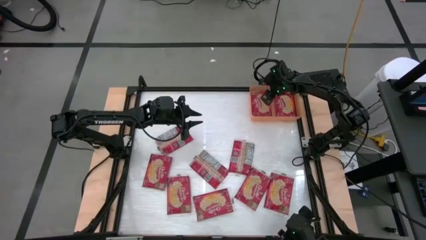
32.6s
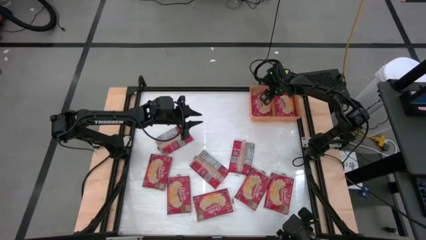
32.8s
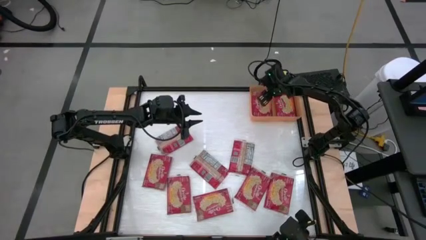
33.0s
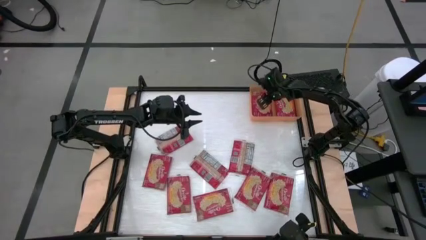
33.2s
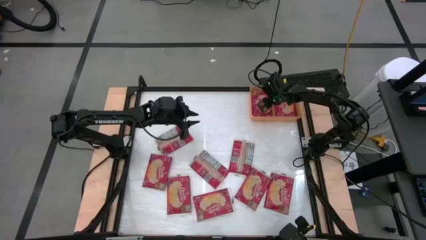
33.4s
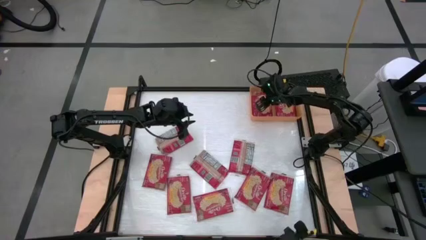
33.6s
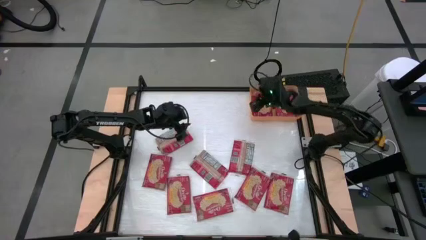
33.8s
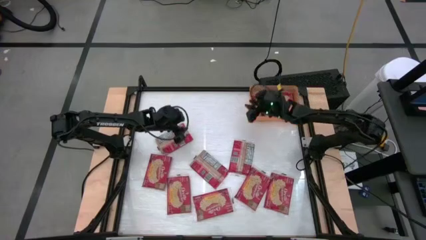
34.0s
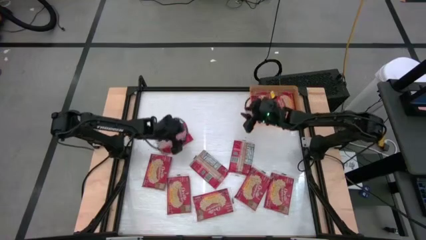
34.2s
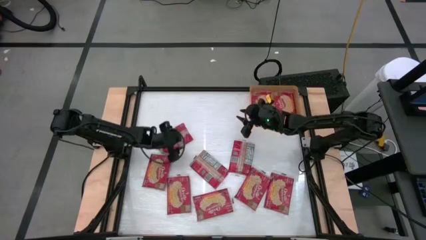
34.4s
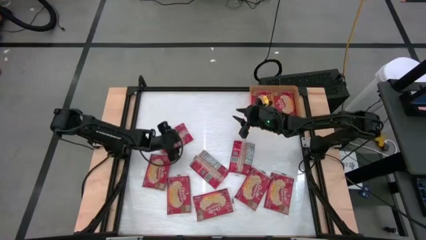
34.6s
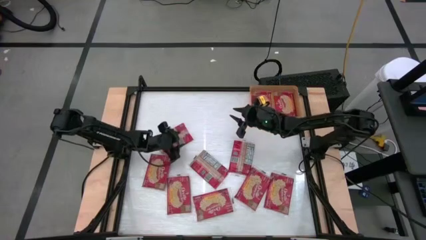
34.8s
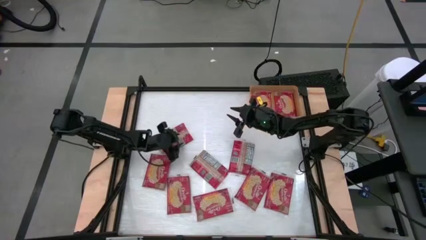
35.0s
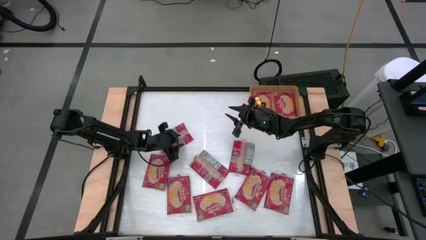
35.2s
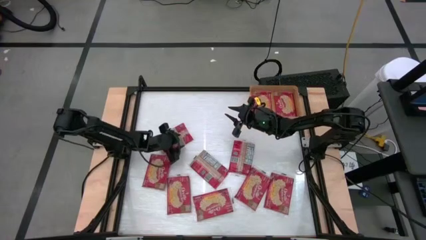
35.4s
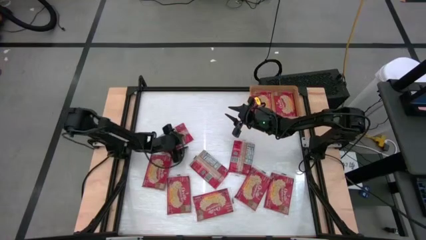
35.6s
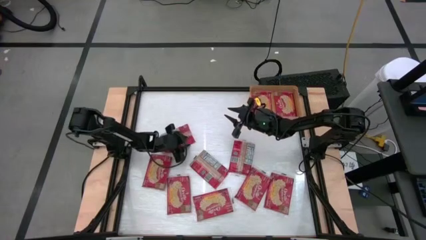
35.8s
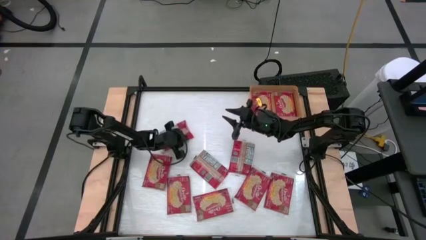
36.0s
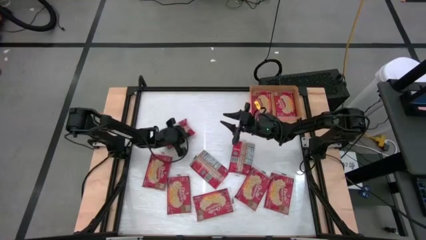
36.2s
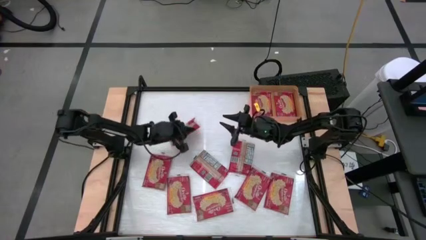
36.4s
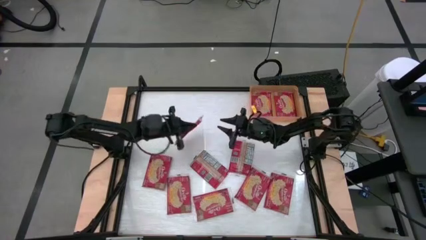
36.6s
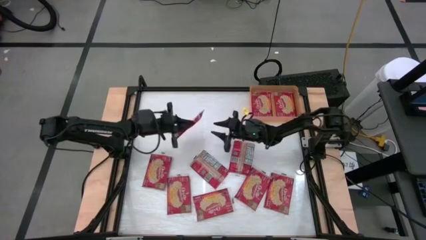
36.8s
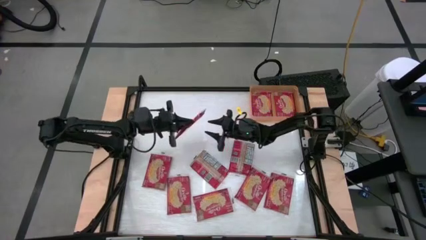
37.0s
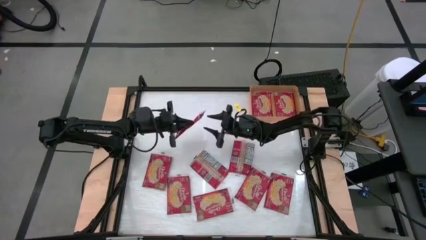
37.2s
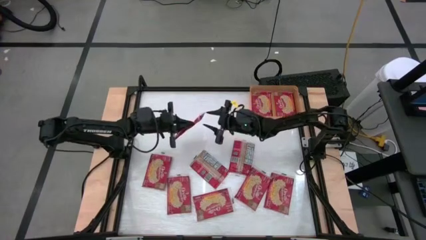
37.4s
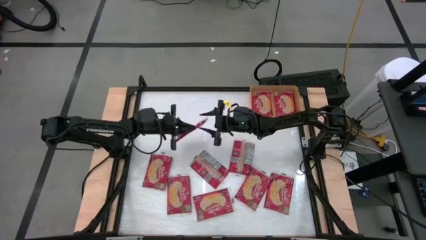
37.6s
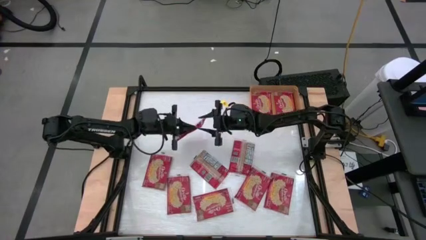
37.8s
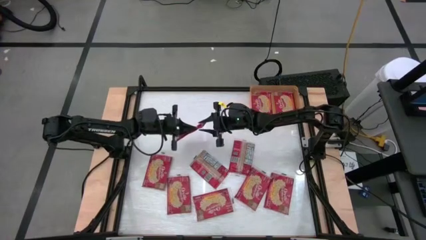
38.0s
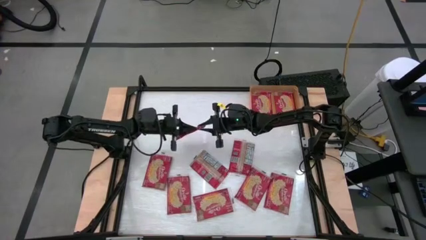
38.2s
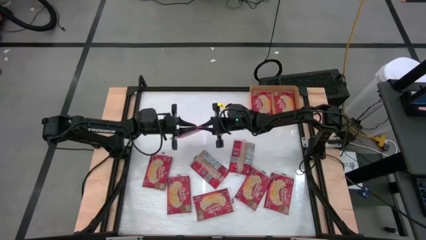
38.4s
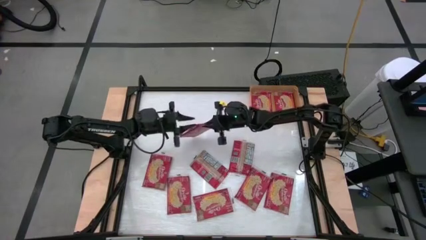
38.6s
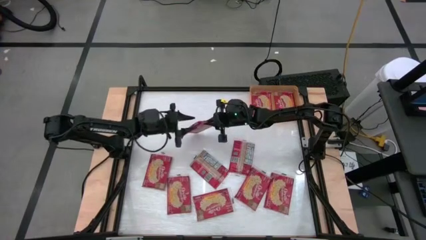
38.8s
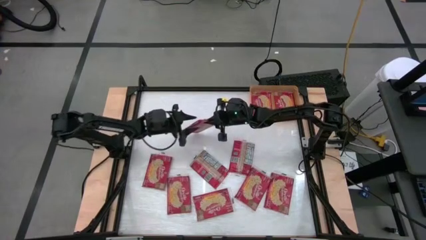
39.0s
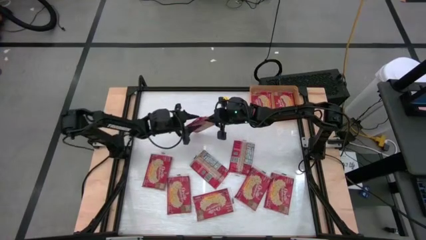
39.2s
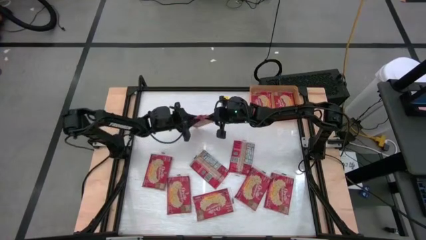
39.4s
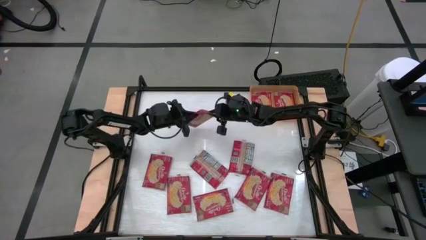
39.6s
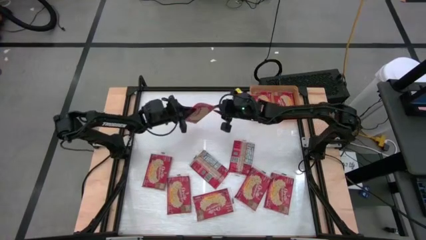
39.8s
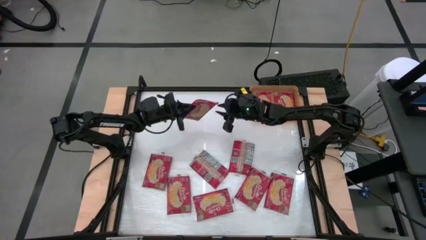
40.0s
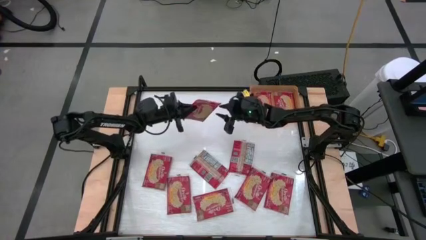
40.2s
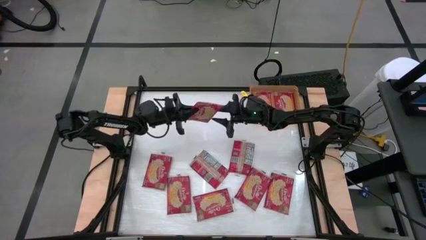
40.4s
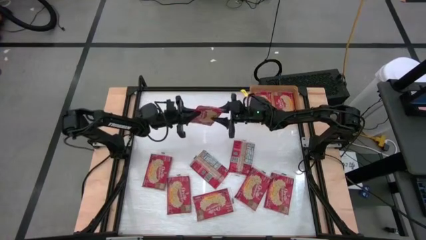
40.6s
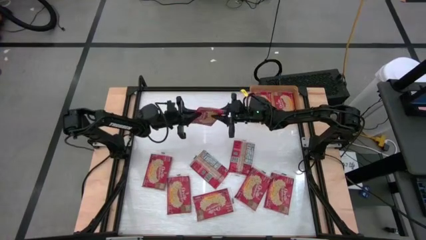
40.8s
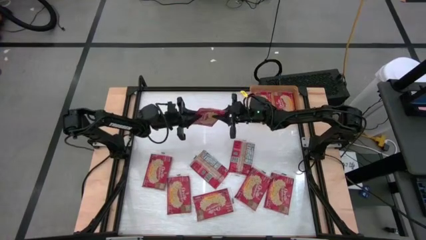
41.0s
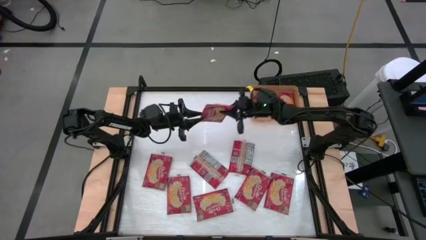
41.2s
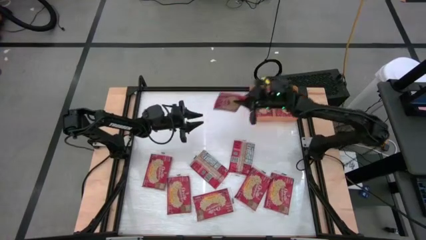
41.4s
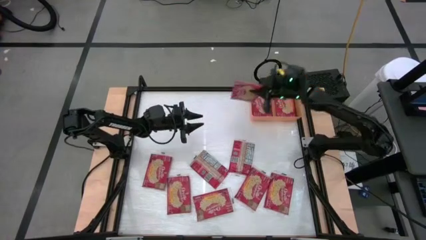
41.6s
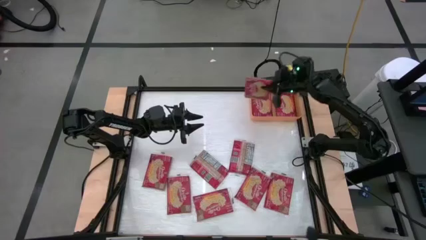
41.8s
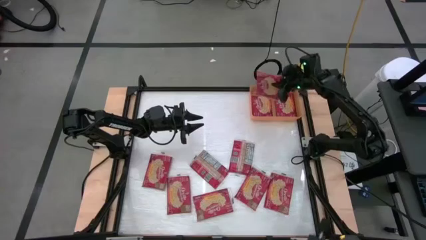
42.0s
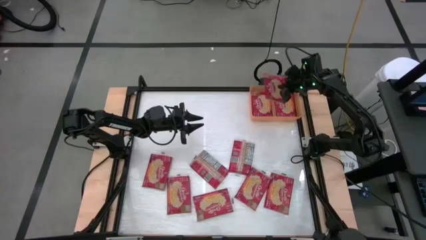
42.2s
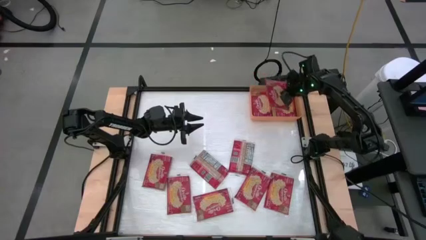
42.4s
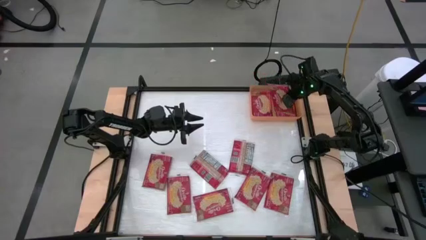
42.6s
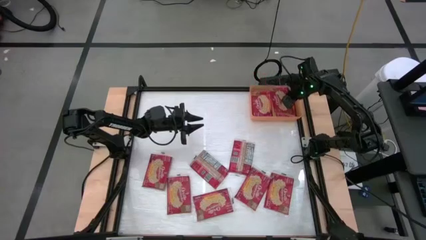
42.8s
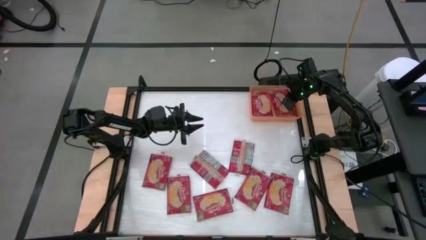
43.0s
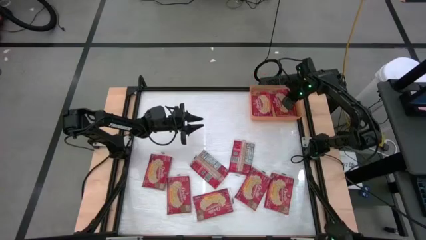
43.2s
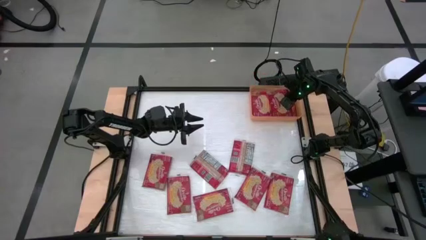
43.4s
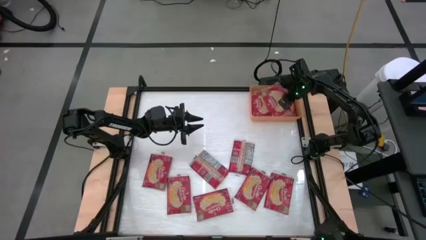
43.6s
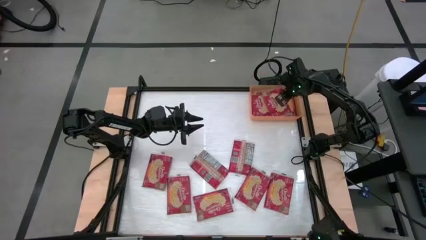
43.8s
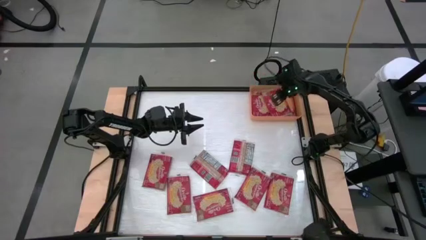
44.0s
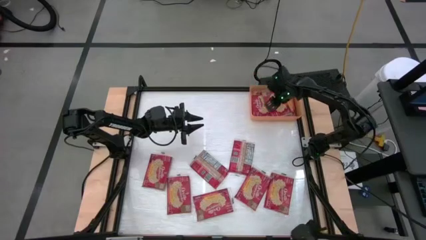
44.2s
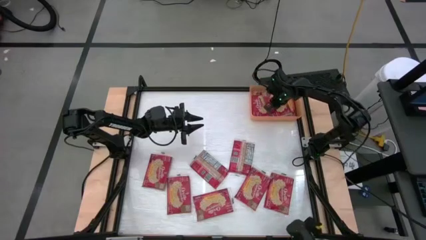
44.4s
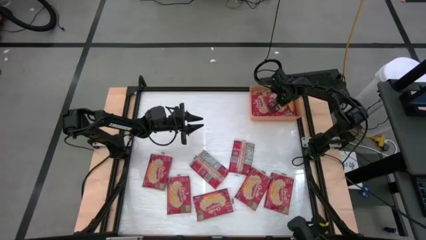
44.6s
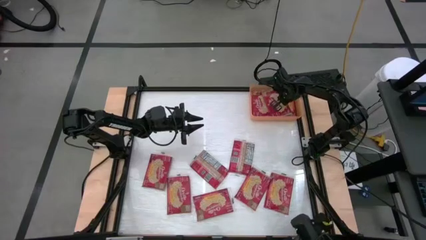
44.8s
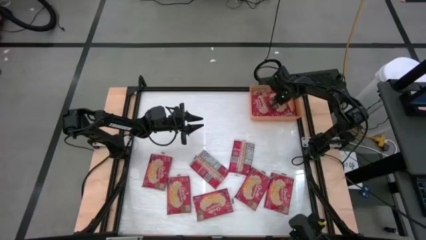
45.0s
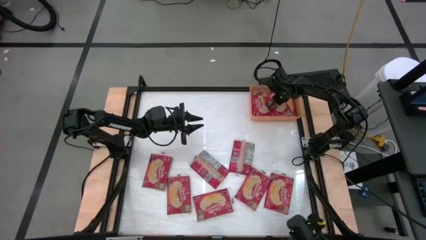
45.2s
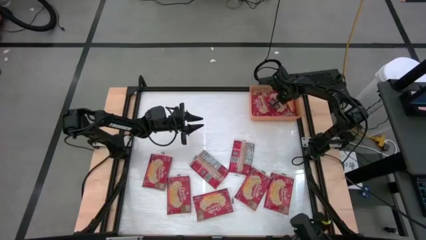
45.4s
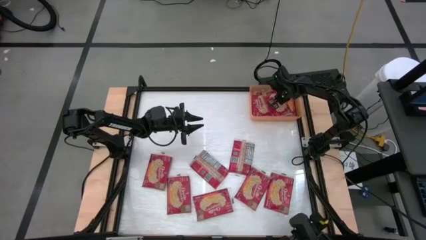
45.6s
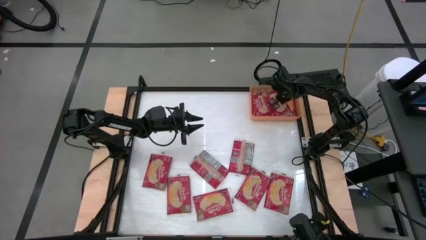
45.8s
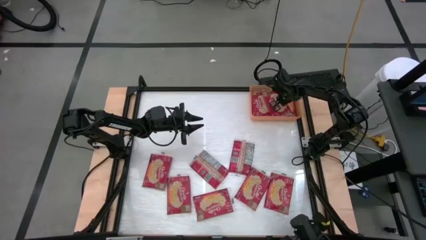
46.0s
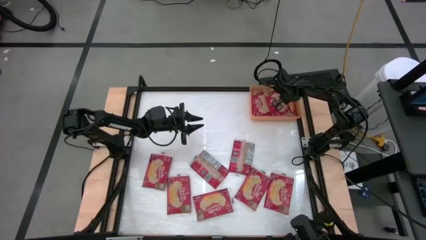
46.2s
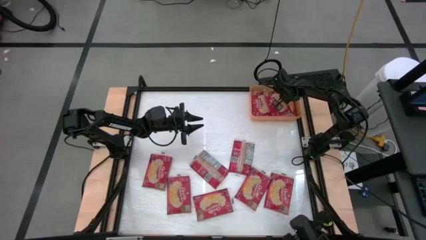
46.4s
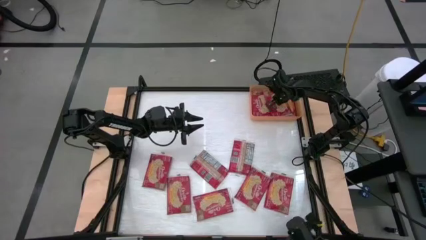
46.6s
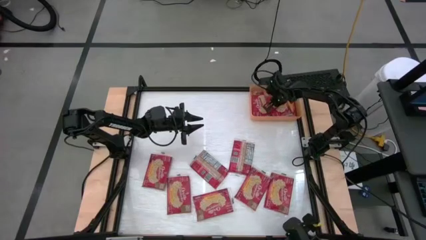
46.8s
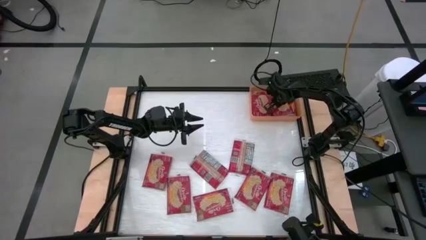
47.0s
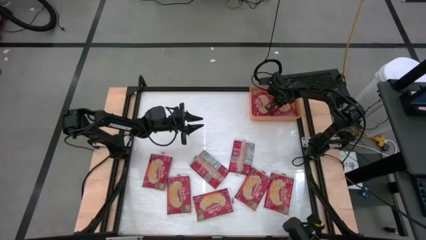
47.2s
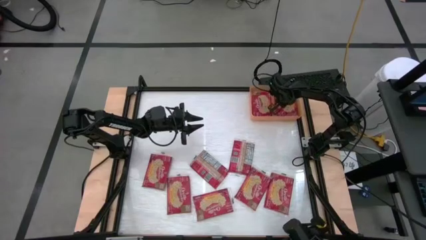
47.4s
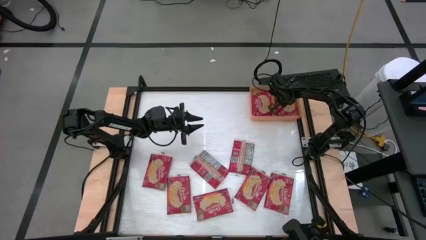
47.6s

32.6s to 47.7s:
Task: Sort popcorn bags into baskets
Put the red popcorn bag into the orange bin
